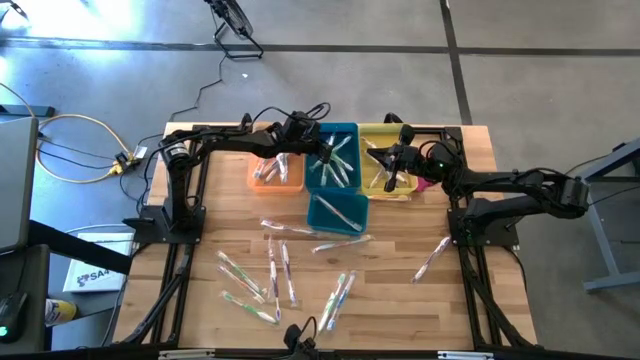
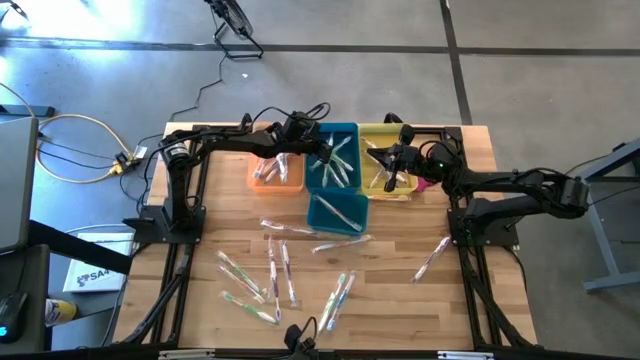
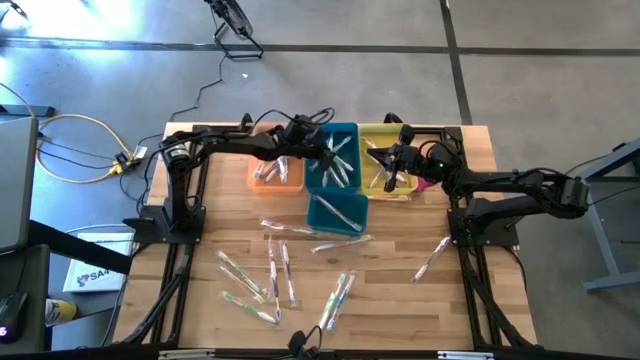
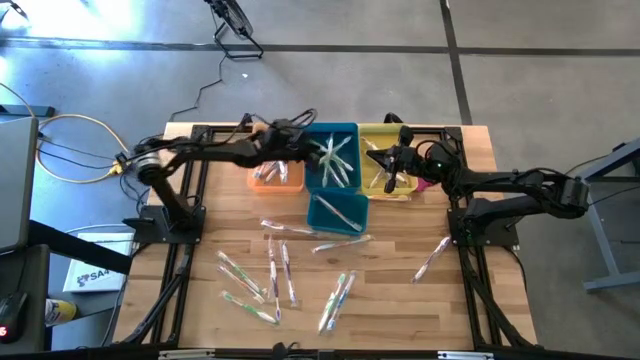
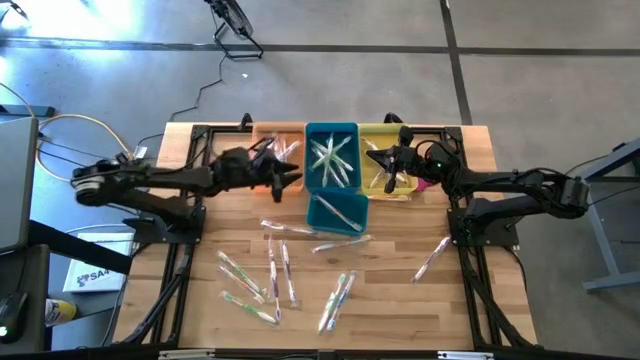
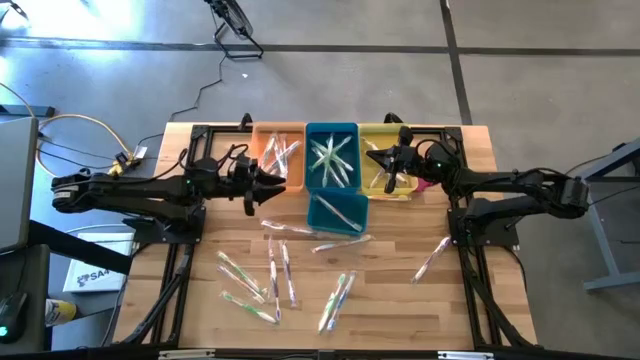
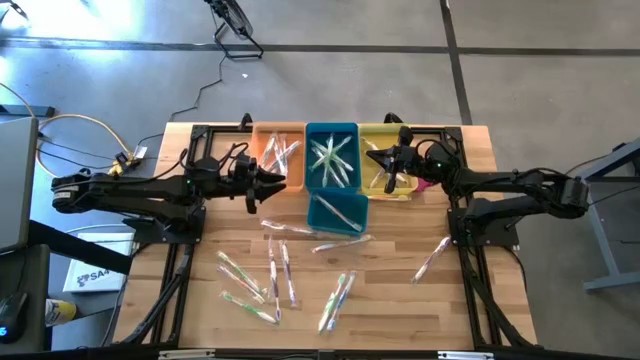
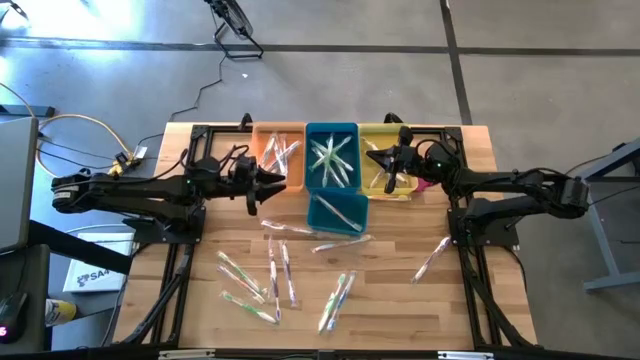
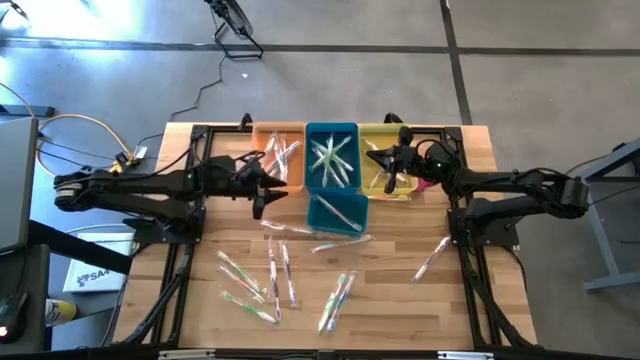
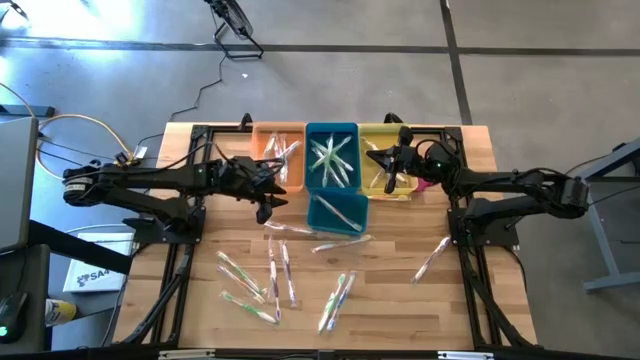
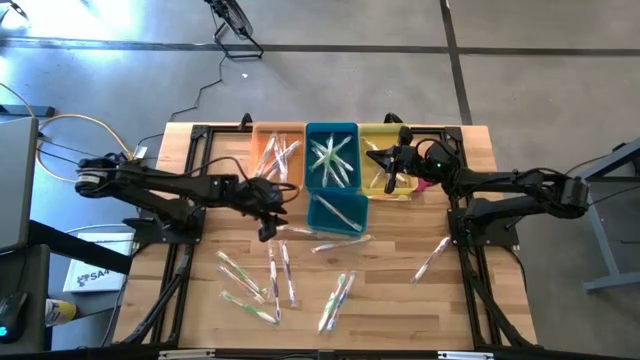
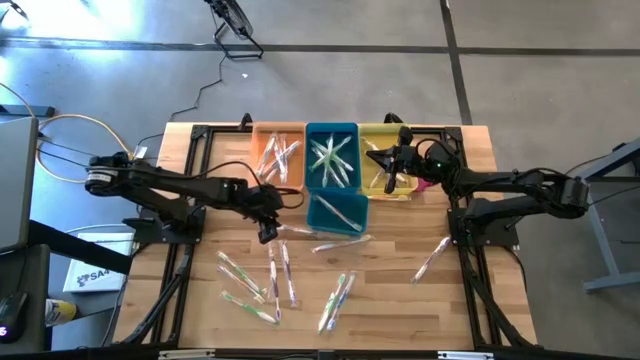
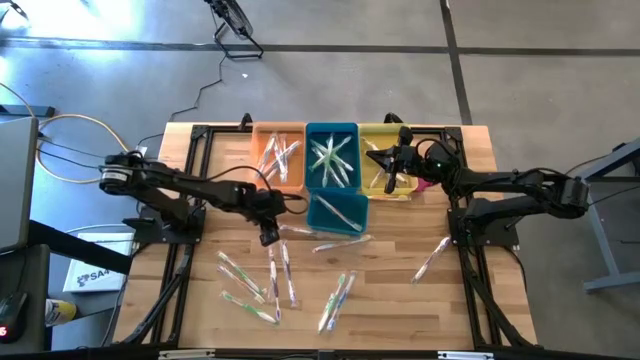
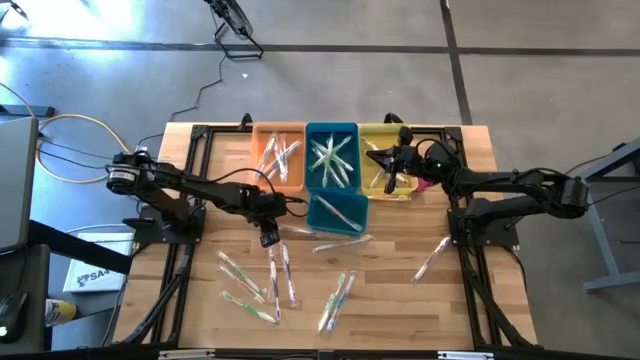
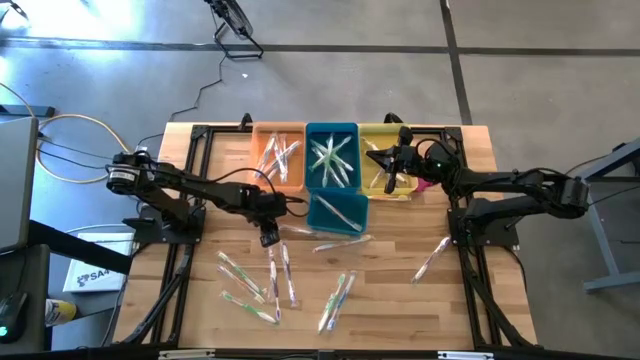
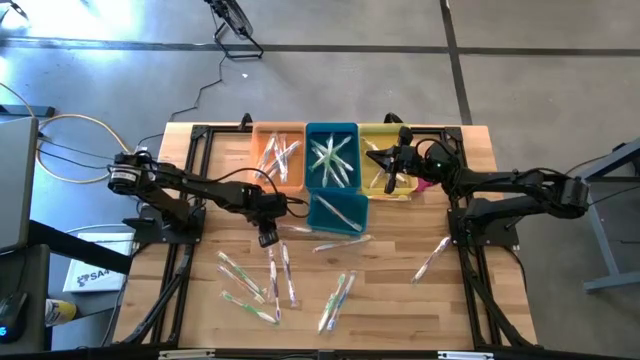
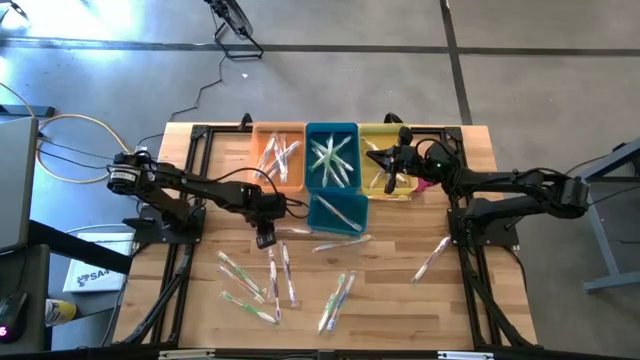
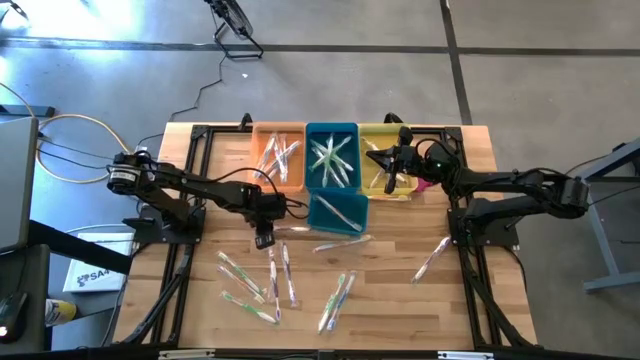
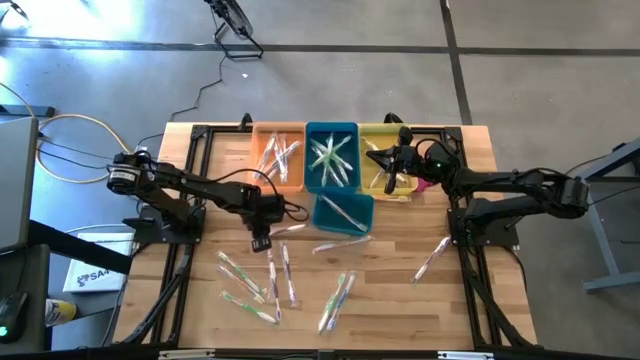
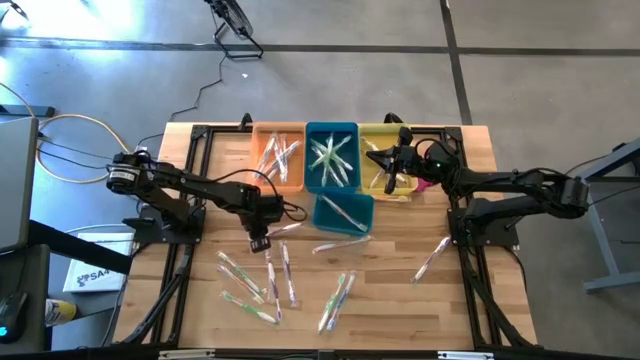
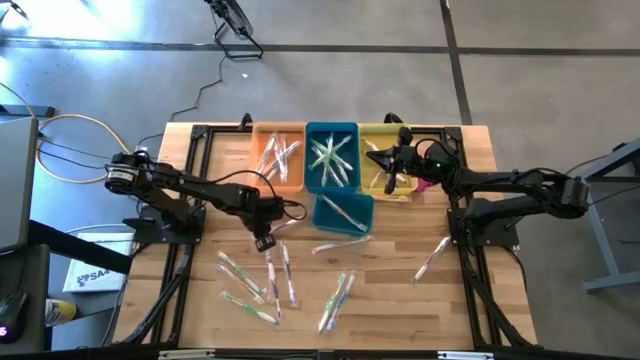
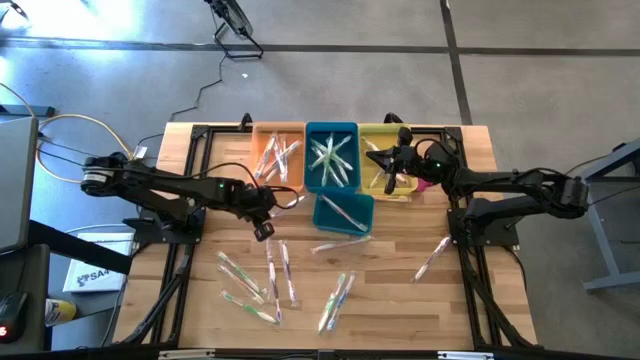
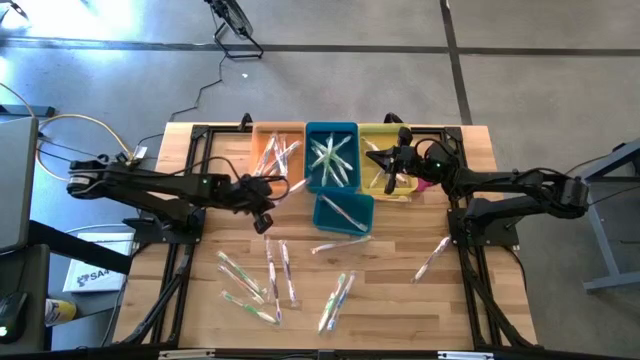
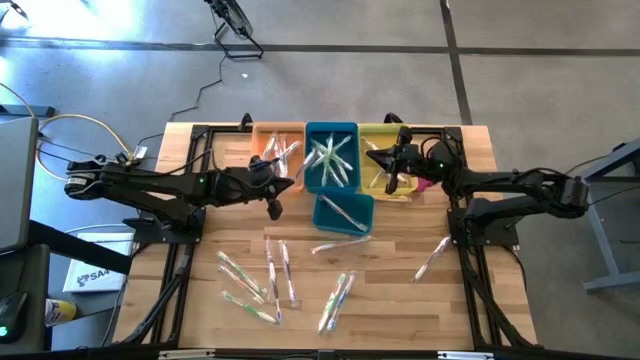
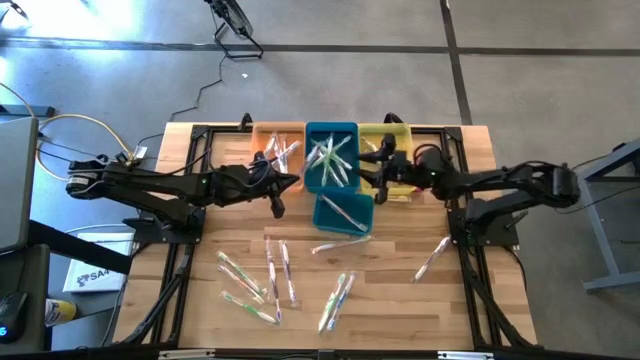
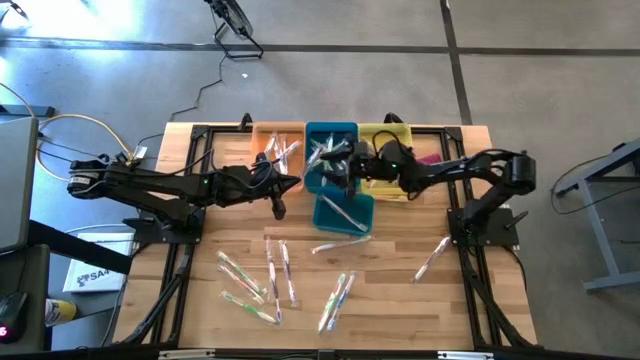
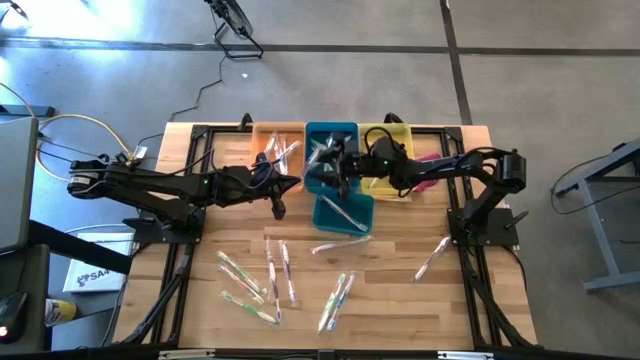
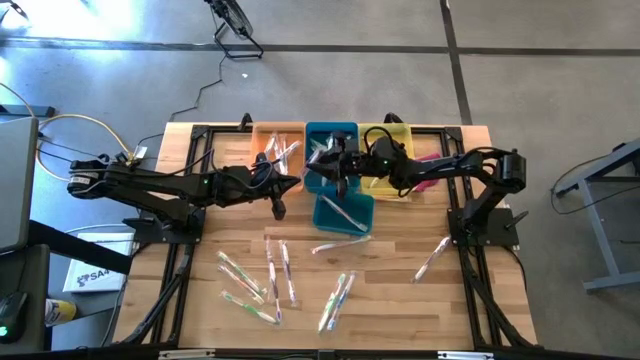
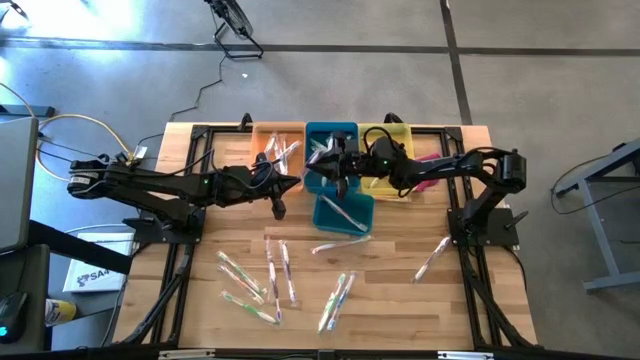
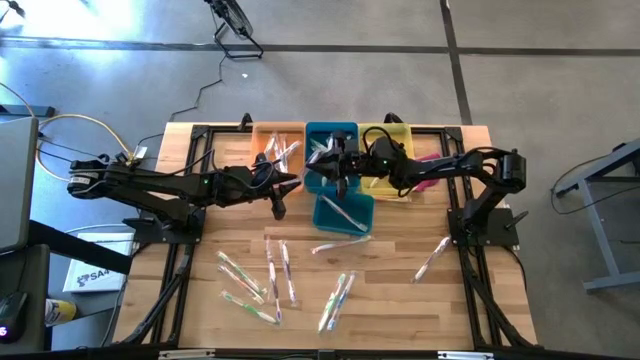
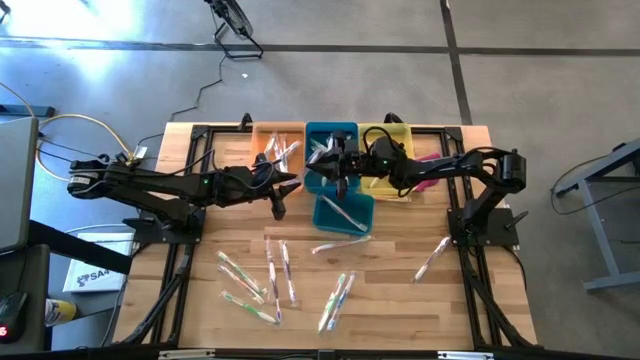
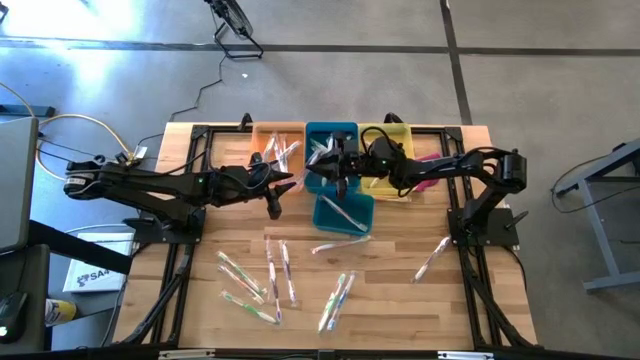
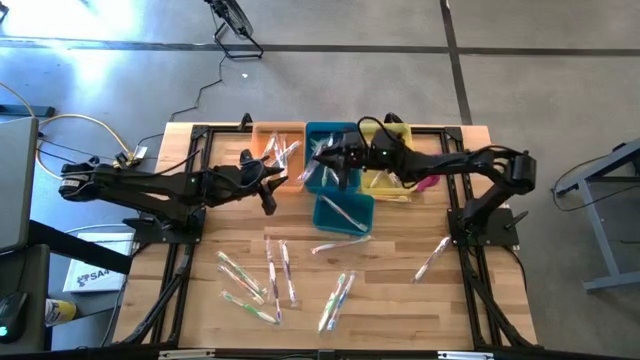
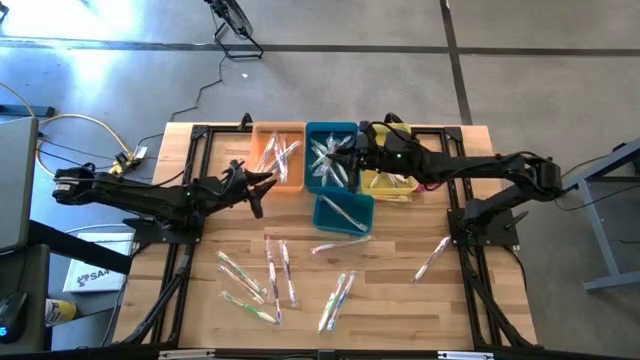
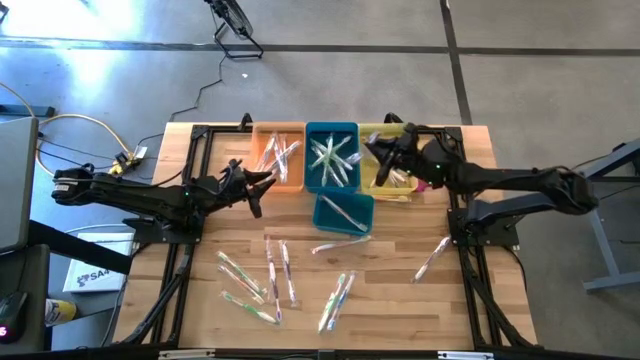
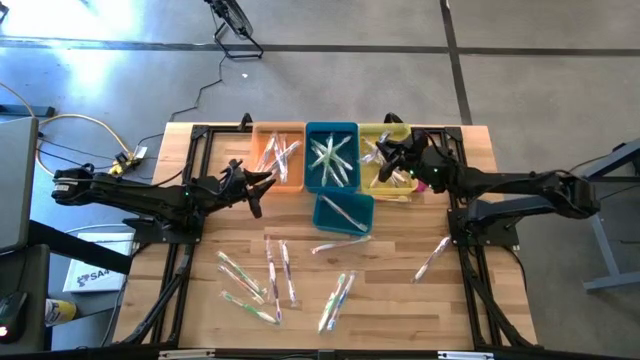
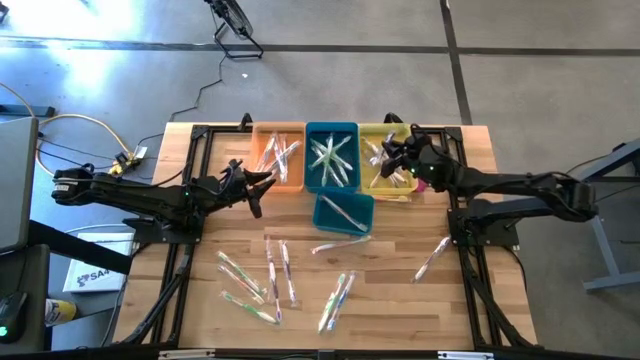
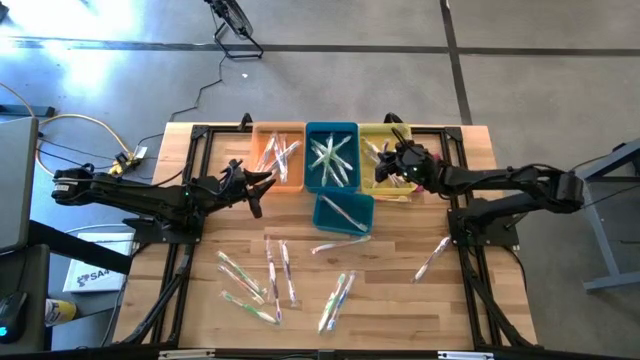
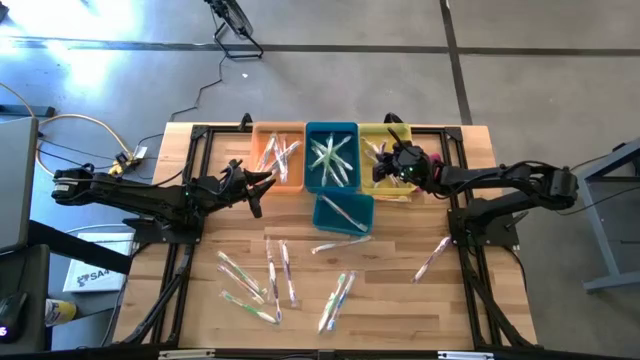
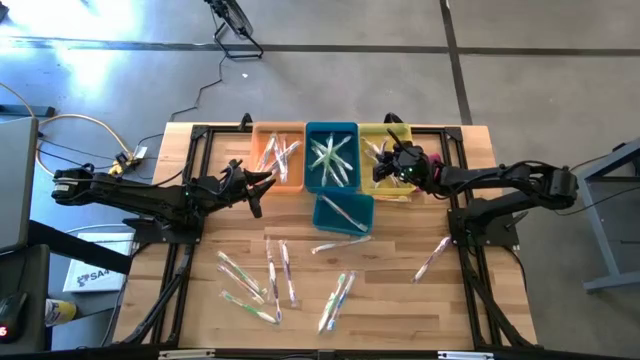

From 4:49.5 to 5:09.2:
Task: Pick & Place Toothbrushes
Put the violet toothbrush into the yellow bin

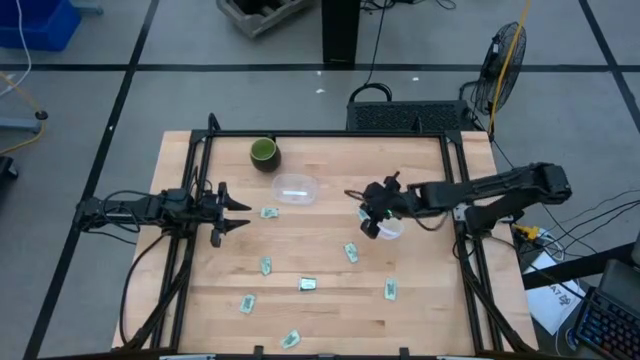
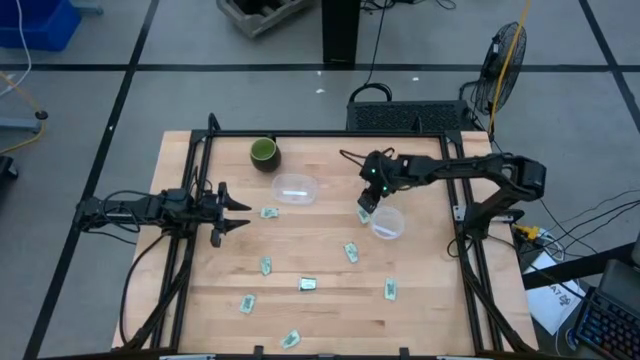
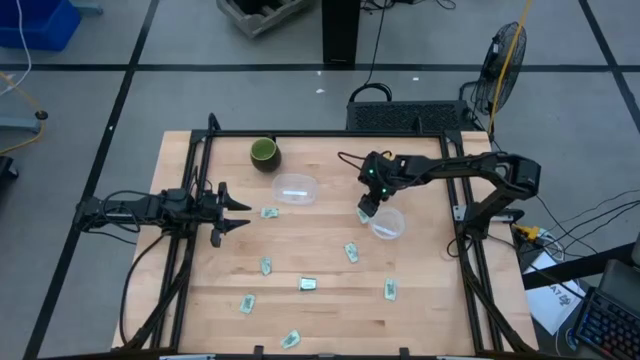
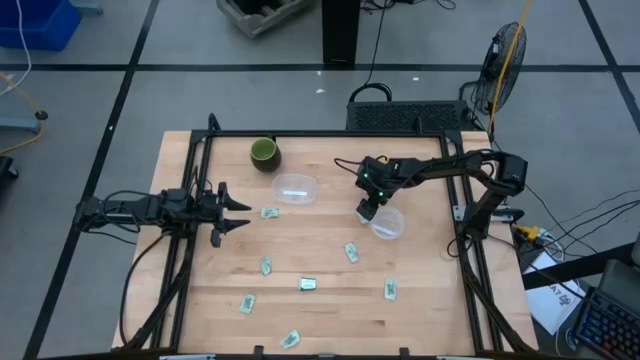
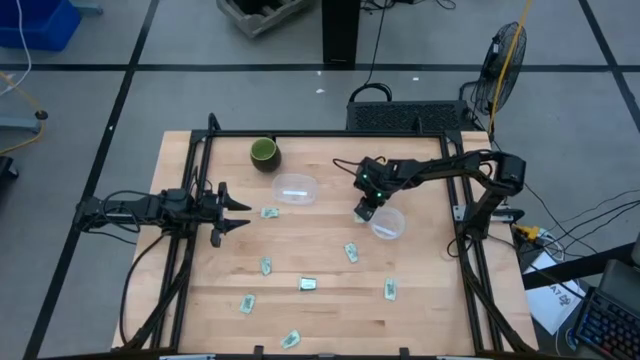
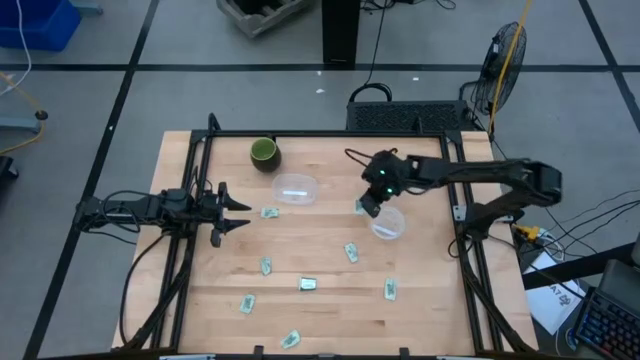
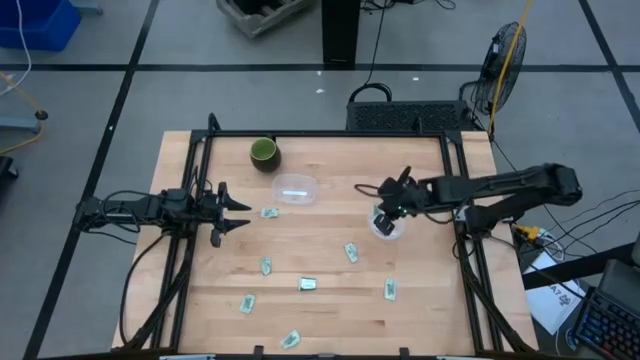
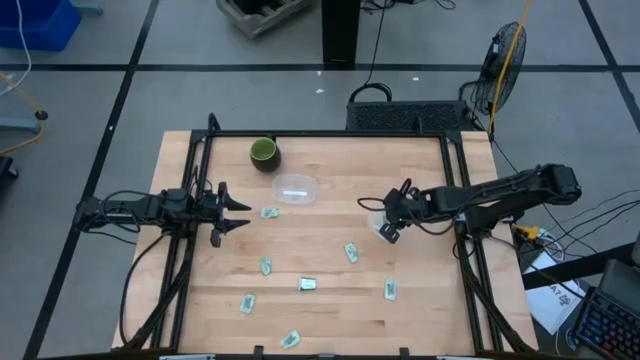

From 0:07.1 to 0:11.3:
Task: Pick and place items into bin
Put the light green stevia packet into the right transparent bin
